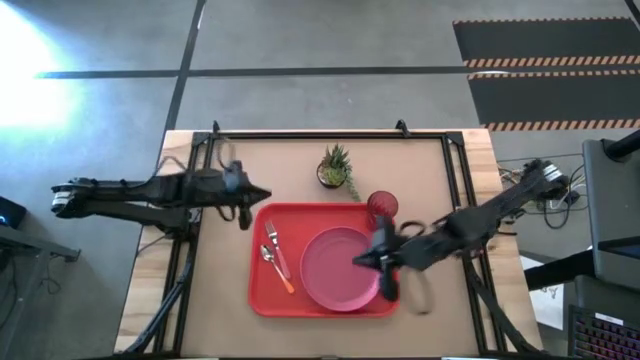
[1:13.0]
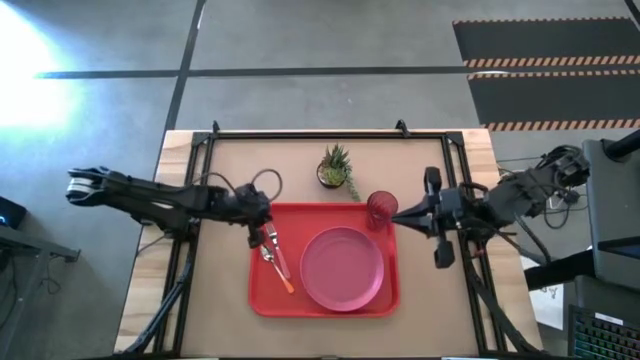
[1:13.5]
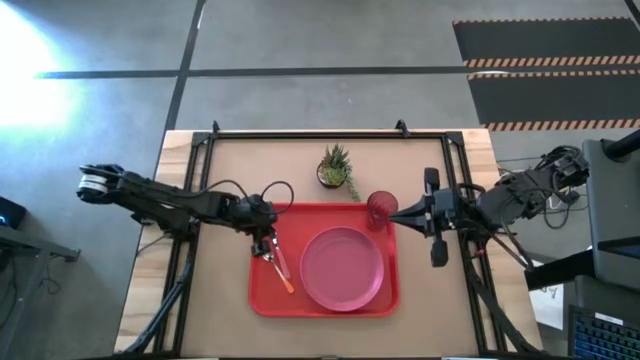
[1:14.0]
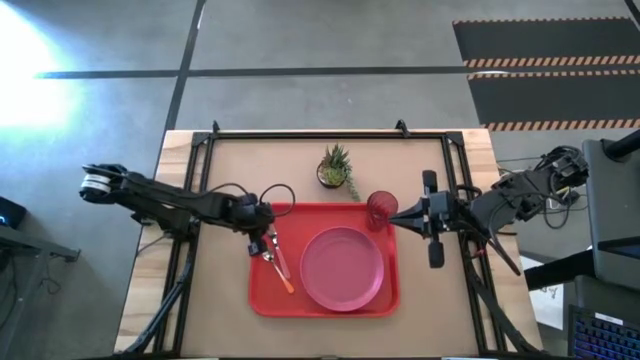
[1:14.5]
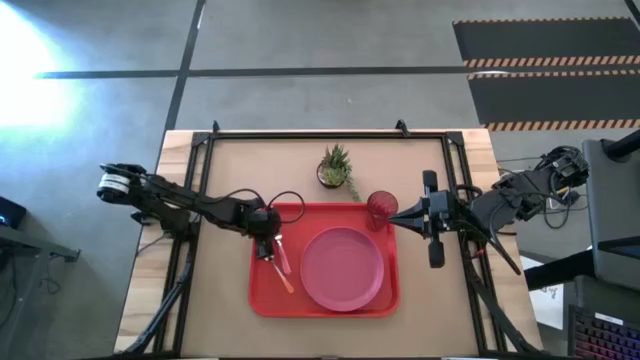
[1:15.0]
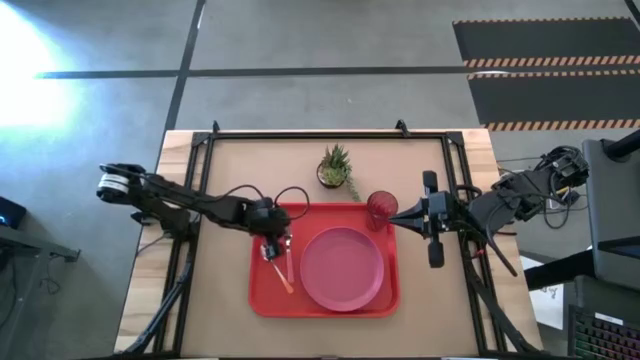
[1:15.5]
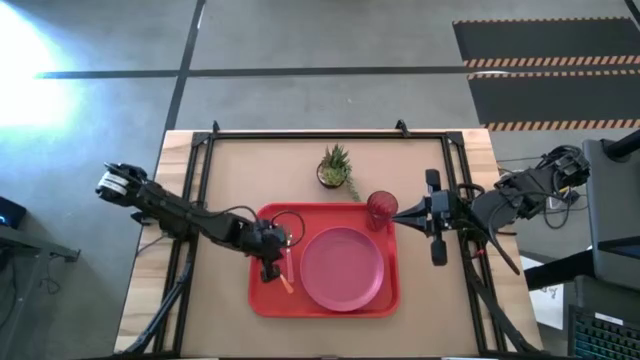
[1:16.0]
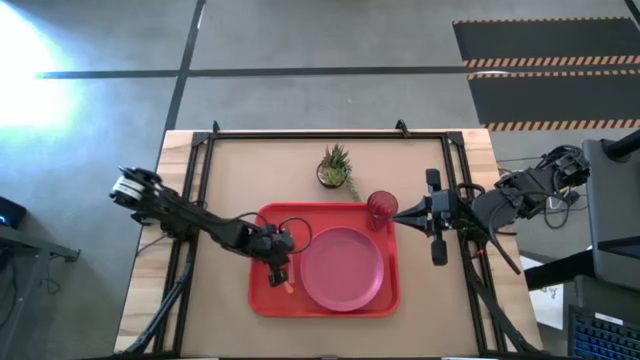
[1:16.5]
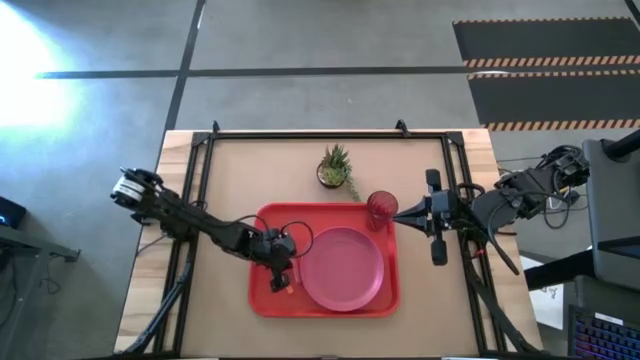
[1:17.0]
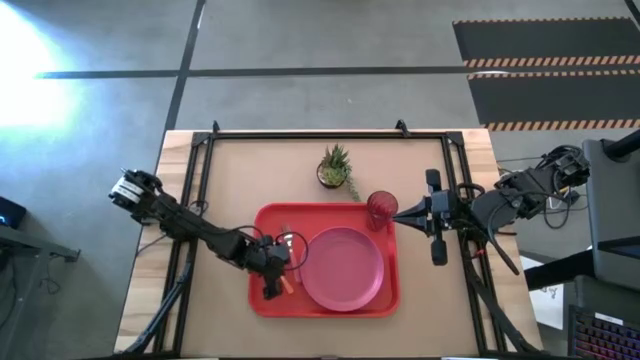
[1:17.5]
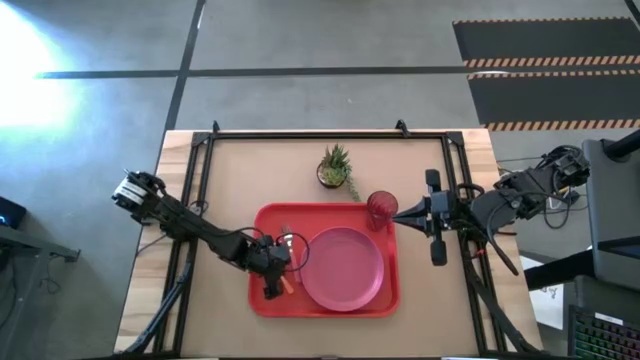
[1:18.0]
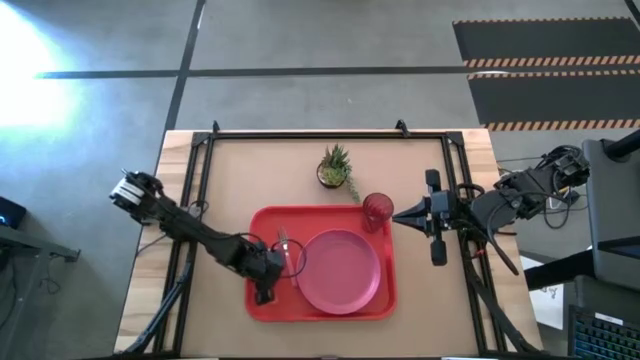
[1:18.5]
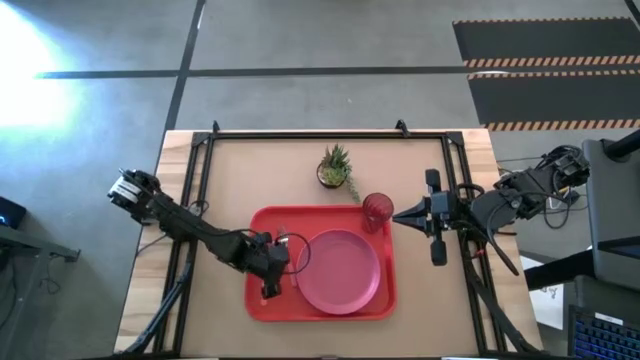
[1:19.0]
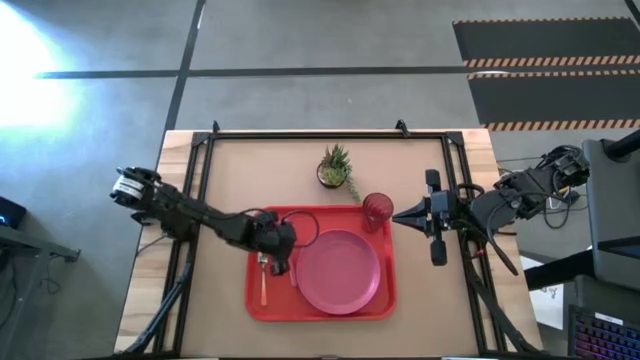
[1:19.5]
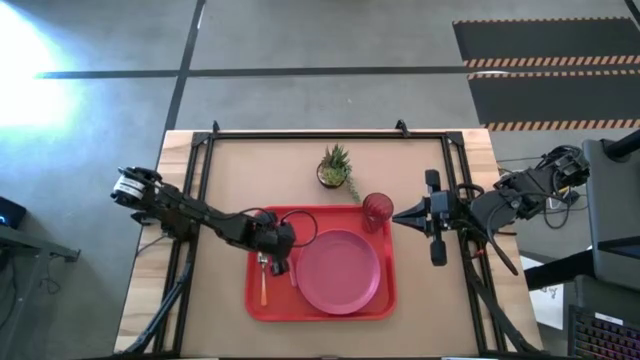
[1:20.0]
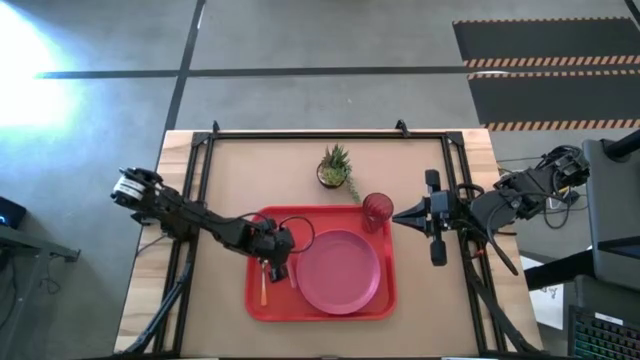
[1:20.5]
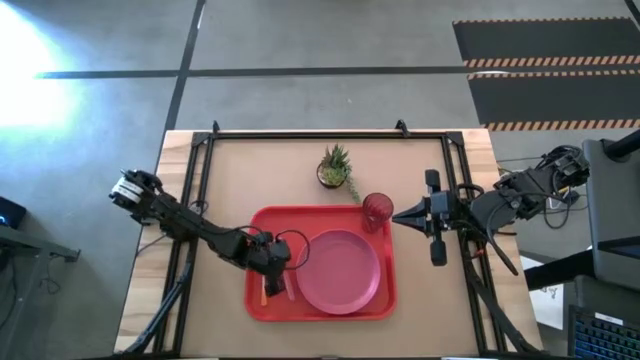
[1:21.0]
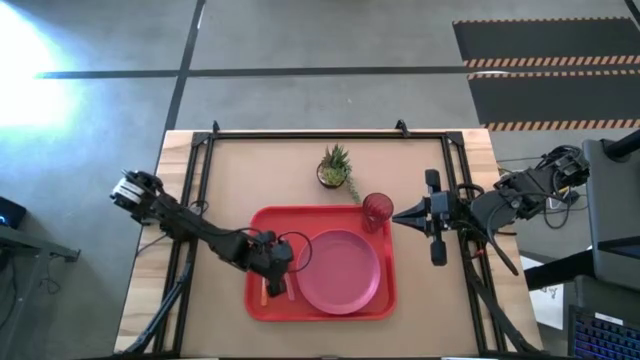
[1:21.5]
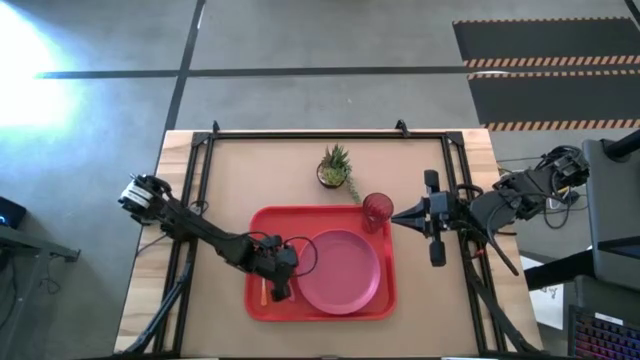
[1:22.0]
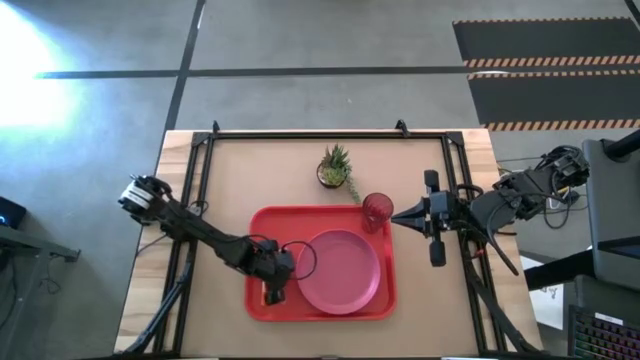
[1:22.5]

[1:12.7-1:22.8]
Task: Pick and place plate/cup/fork/spoon on tray
Adjust the silverware on the orange tray

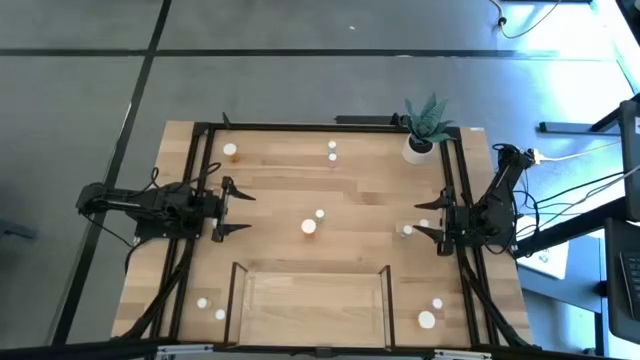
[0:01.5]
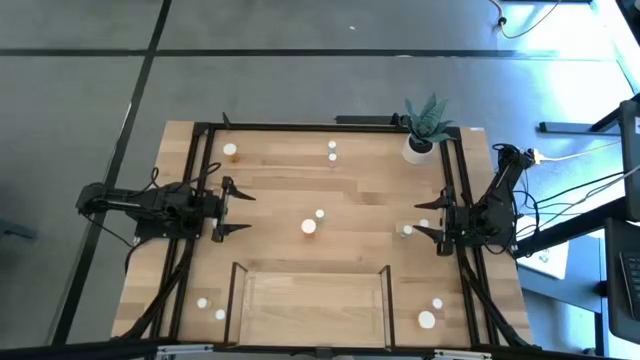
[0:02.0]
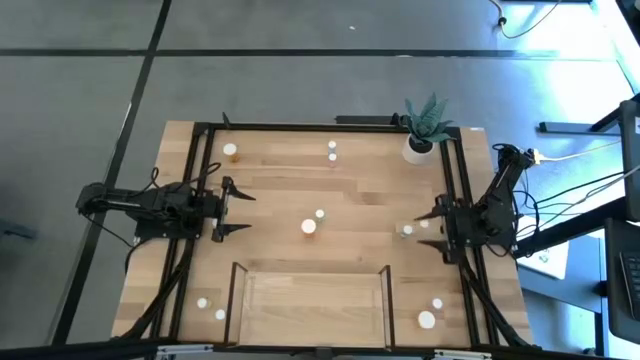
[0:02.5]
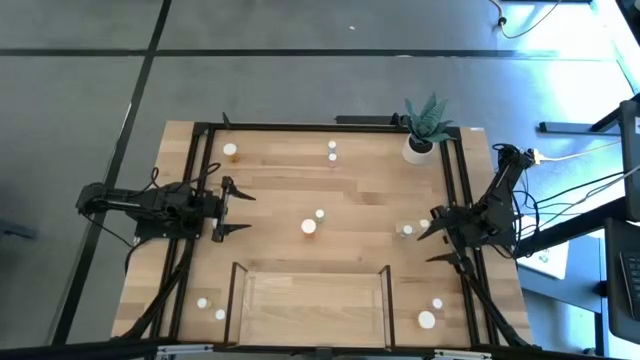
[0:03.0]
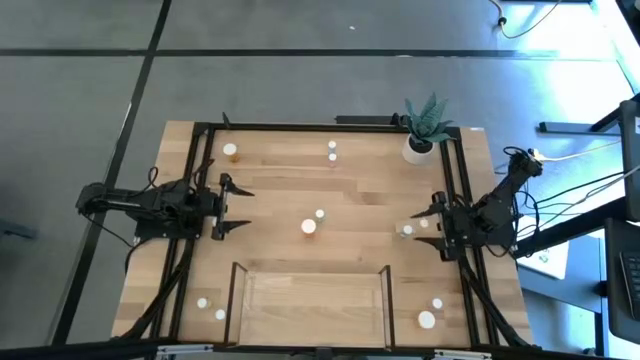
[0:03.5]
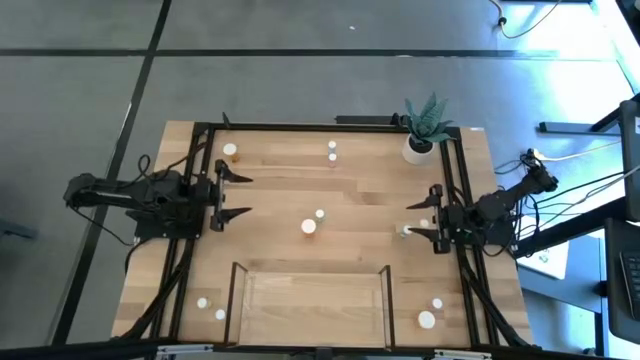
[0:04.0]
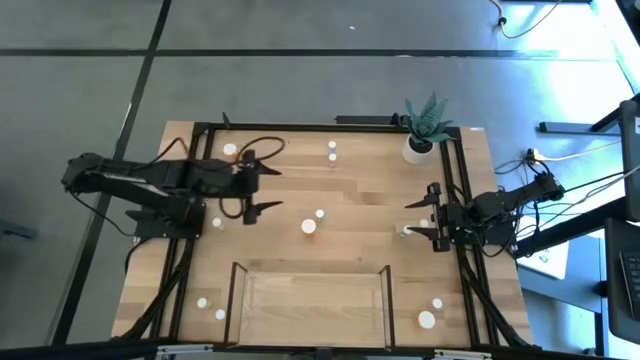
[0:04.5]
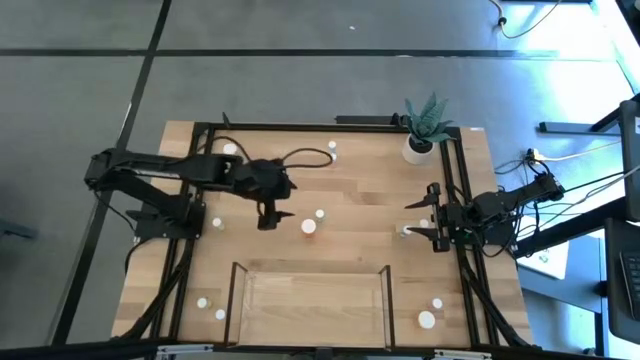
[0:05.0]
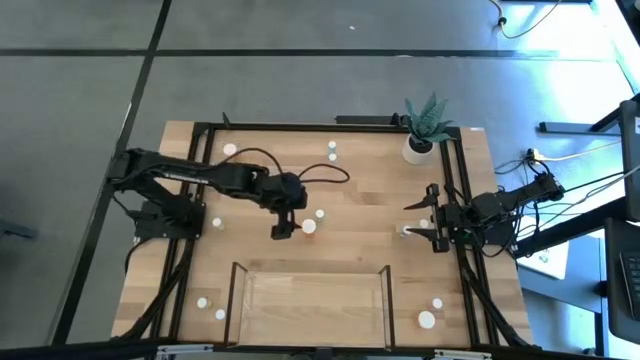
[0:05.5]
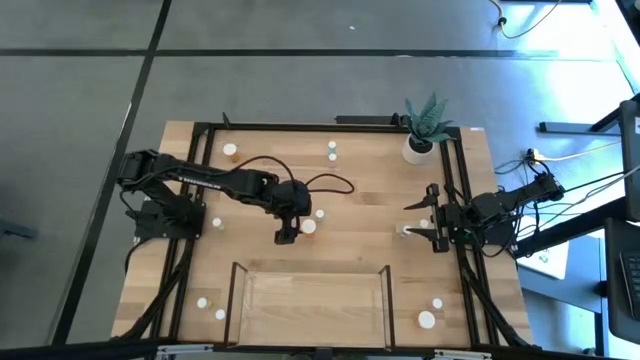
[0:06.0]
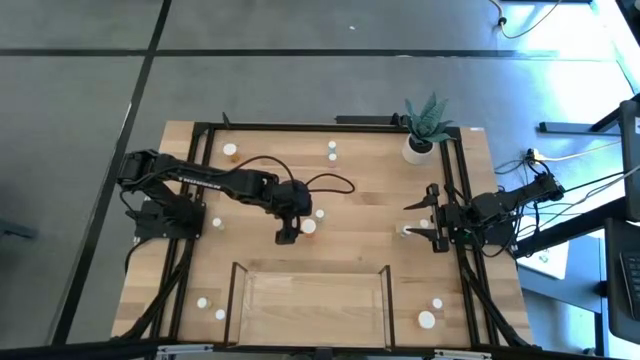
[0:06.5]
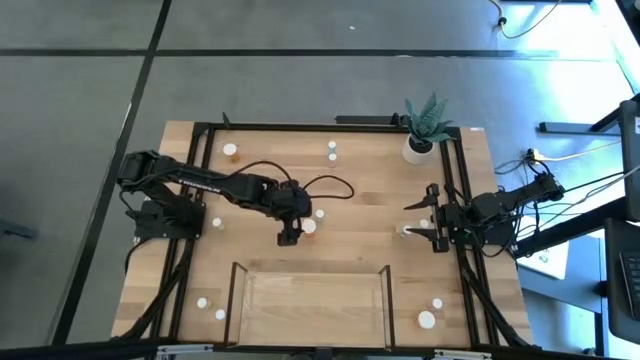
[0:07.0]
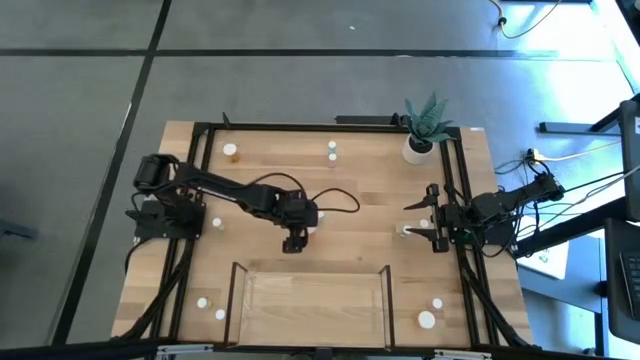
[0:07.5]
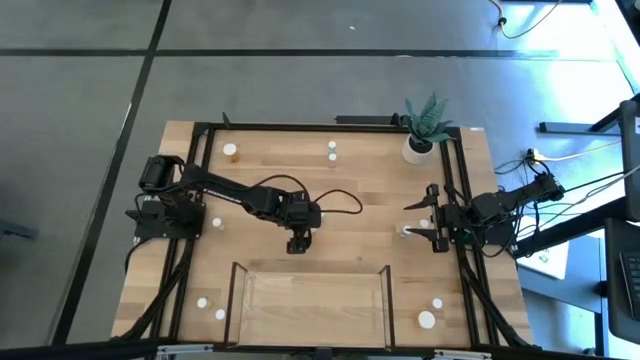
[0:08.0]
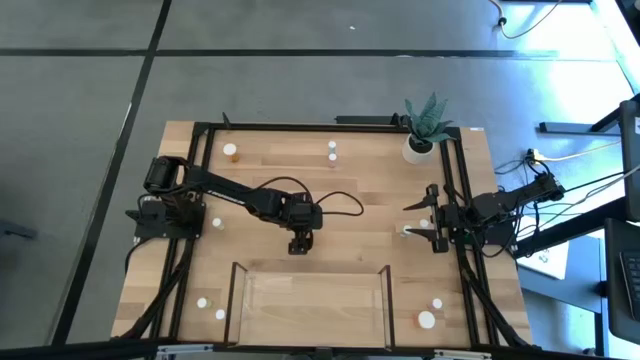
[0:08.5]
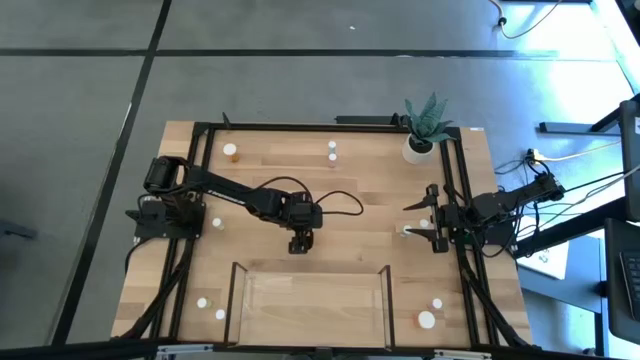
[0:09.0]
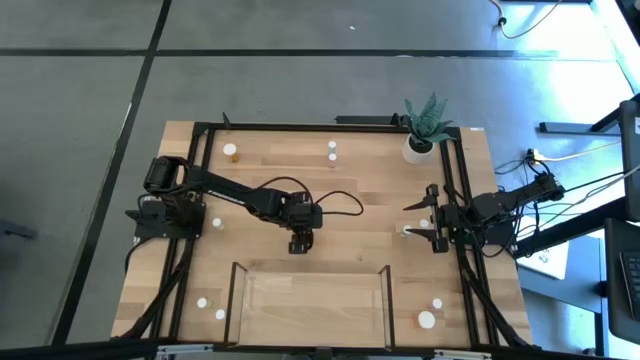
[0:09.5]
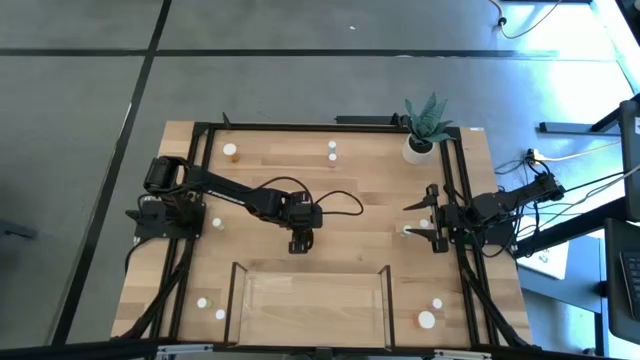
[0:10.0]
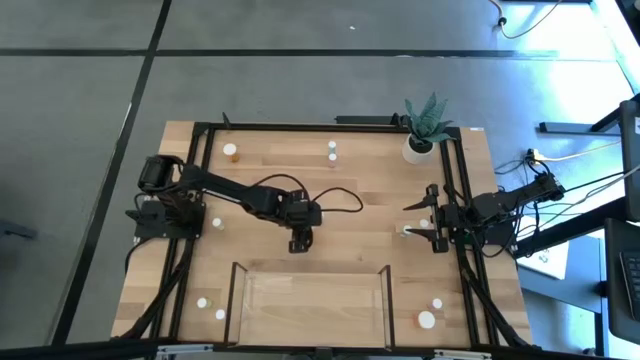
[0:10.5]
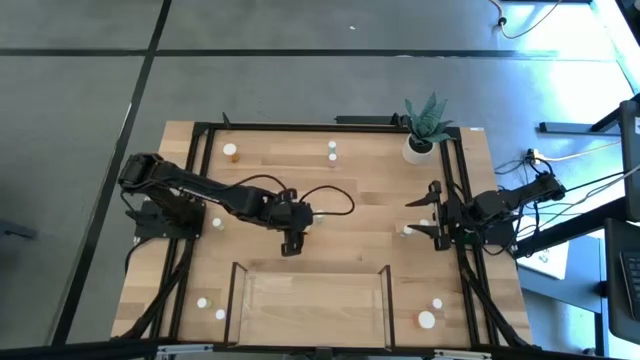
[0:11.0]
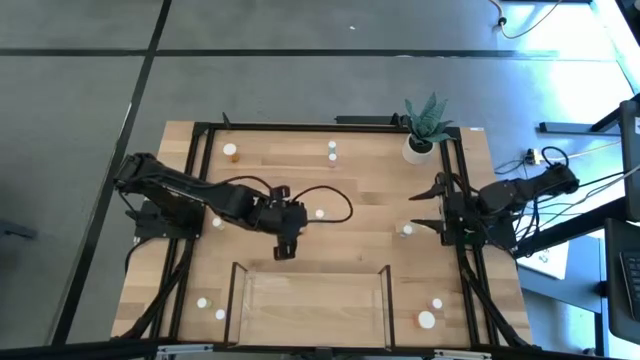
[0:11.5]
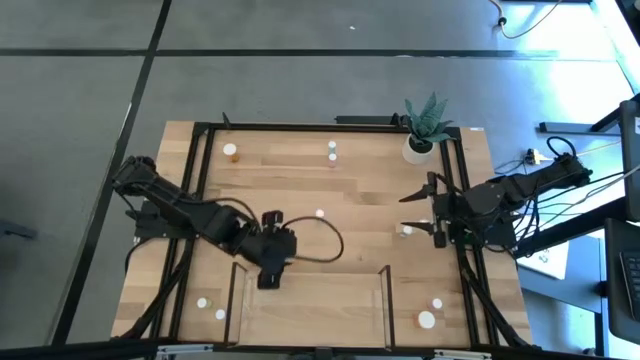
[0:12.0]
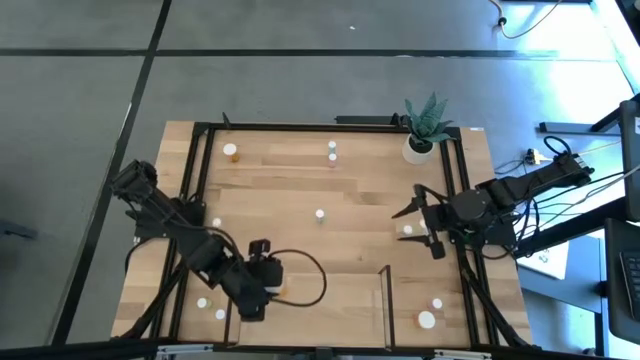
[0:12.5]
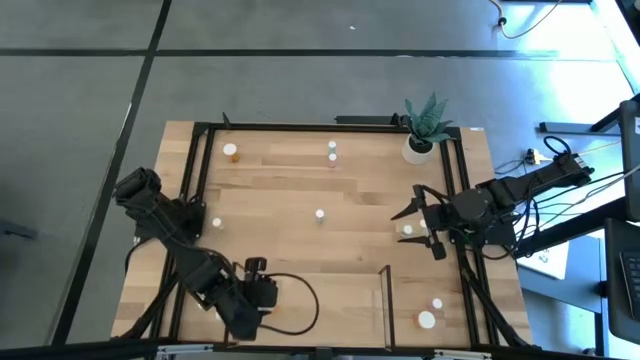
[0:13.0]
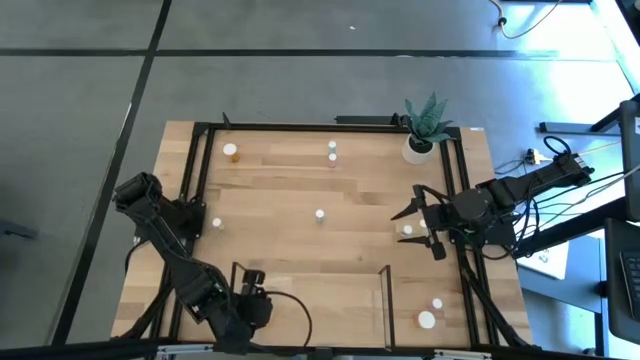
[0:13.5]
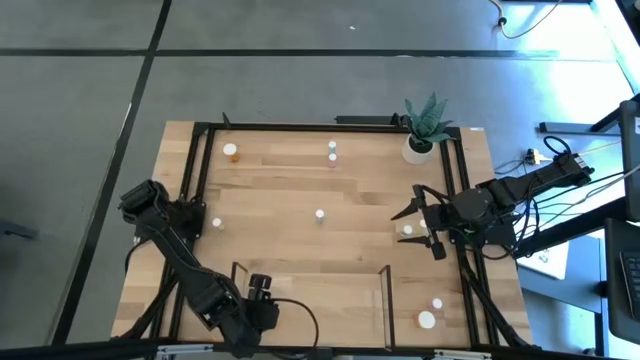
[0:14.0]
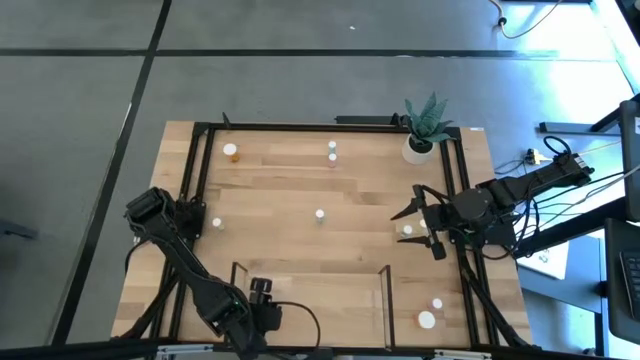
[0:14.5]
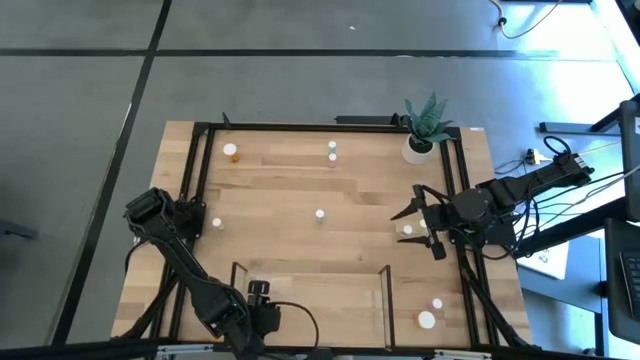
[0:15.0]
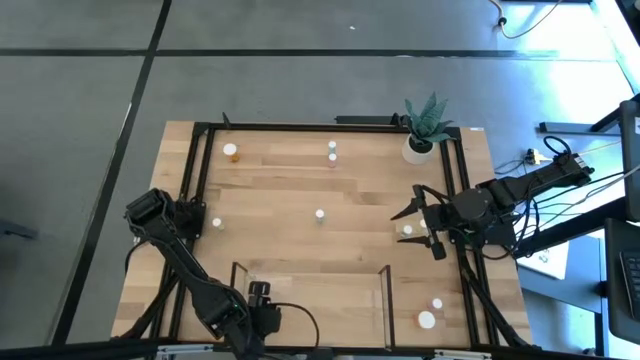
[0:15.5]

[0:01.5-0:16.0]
Task: Pick and place medicine bottles onto shelf by color
Put the middle orange pill bottle on the shelf
